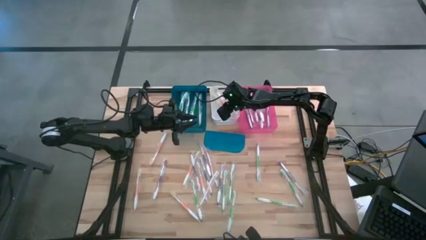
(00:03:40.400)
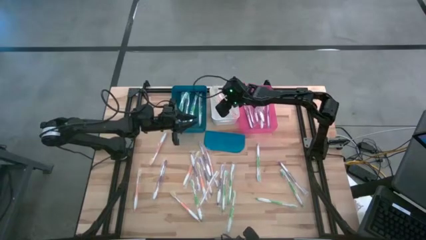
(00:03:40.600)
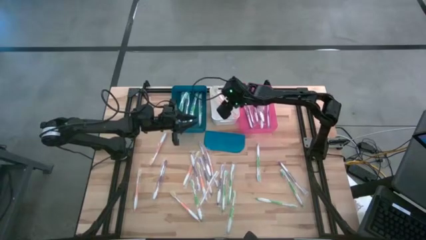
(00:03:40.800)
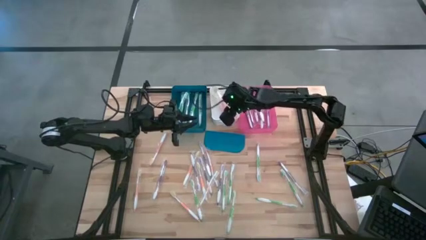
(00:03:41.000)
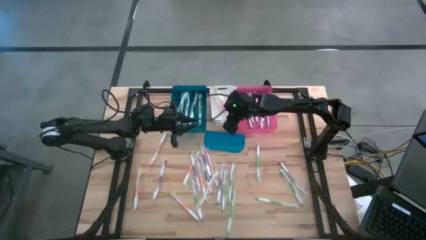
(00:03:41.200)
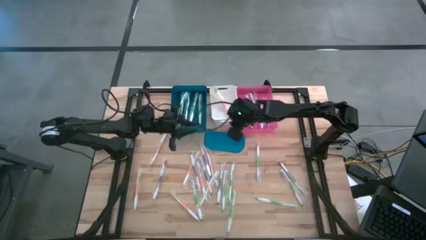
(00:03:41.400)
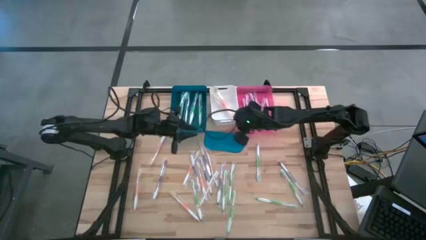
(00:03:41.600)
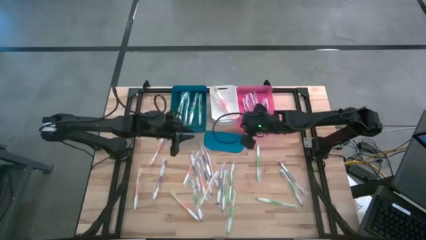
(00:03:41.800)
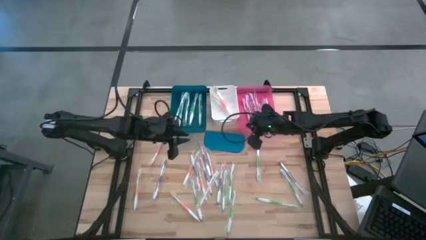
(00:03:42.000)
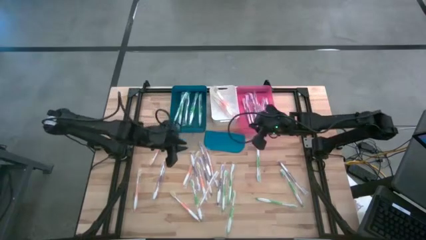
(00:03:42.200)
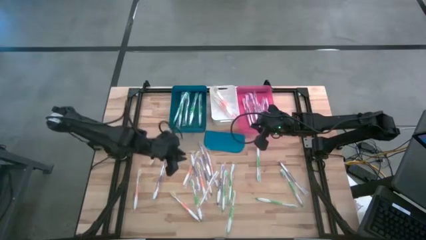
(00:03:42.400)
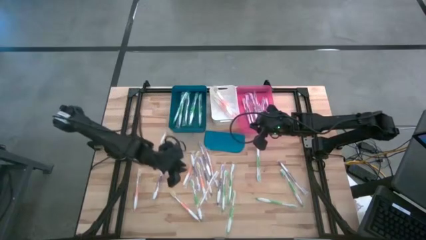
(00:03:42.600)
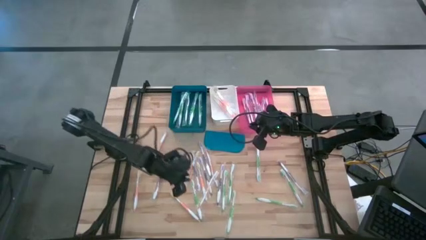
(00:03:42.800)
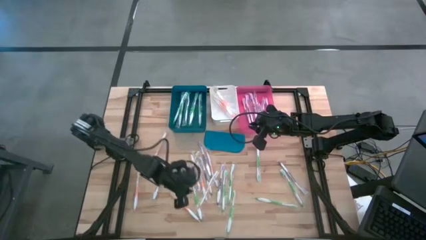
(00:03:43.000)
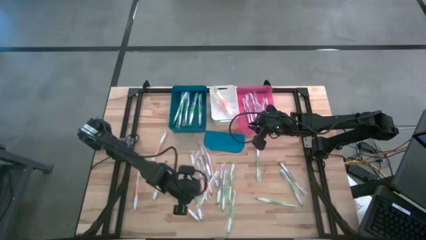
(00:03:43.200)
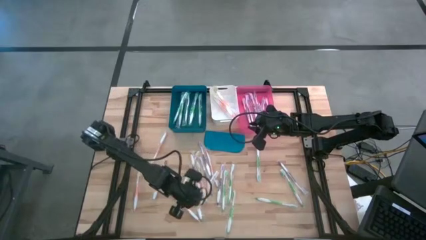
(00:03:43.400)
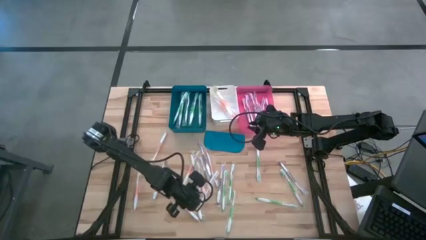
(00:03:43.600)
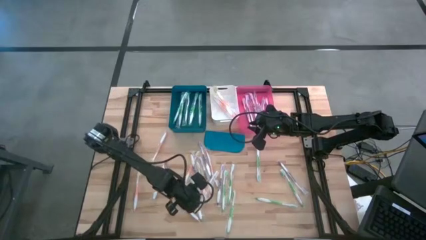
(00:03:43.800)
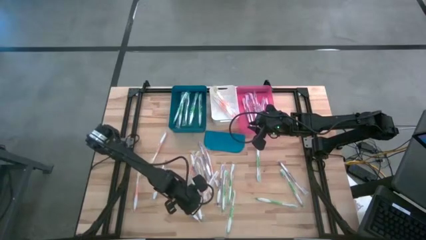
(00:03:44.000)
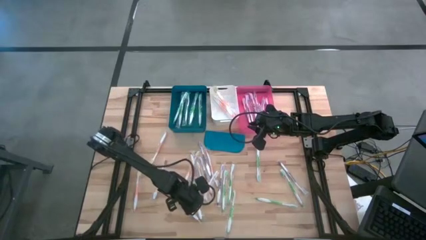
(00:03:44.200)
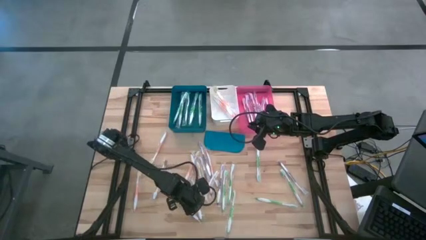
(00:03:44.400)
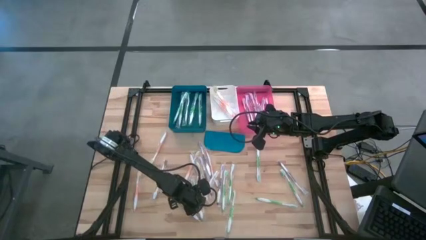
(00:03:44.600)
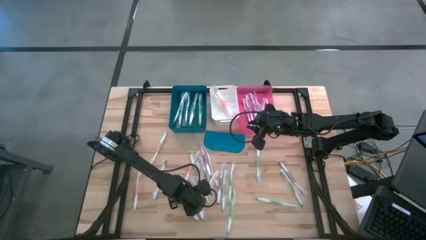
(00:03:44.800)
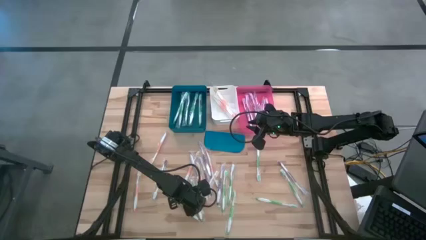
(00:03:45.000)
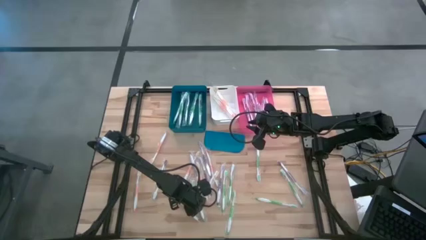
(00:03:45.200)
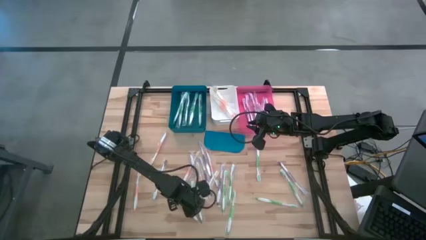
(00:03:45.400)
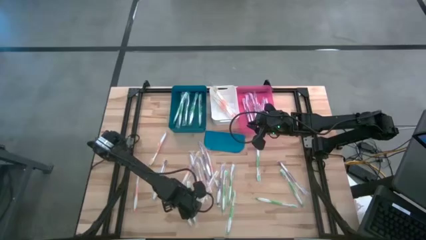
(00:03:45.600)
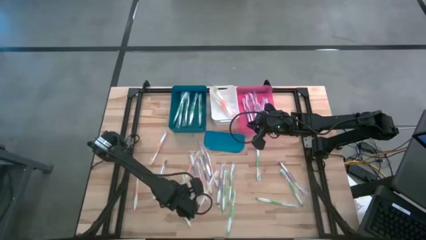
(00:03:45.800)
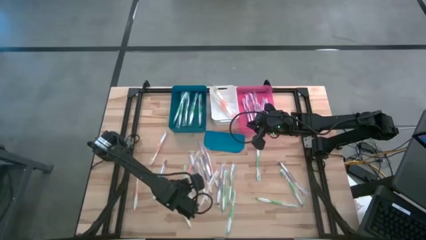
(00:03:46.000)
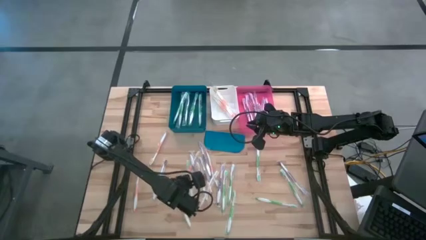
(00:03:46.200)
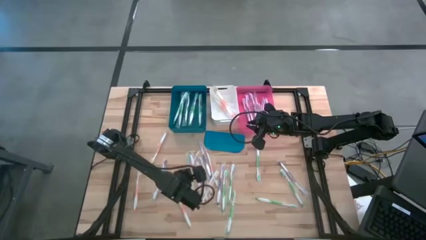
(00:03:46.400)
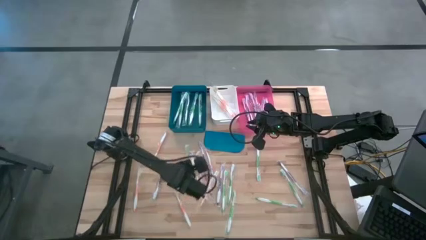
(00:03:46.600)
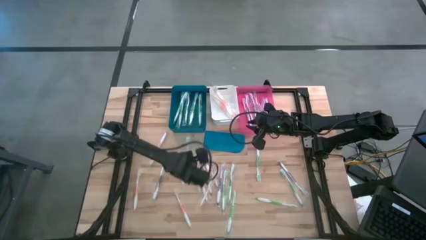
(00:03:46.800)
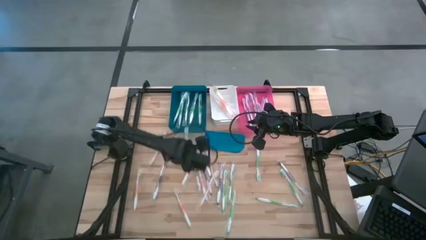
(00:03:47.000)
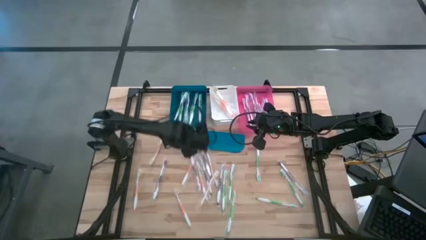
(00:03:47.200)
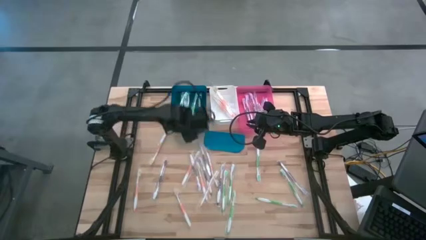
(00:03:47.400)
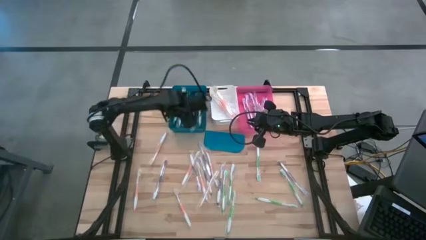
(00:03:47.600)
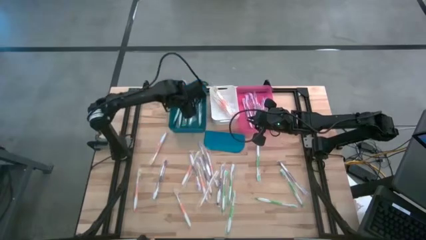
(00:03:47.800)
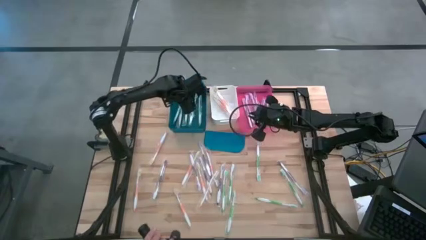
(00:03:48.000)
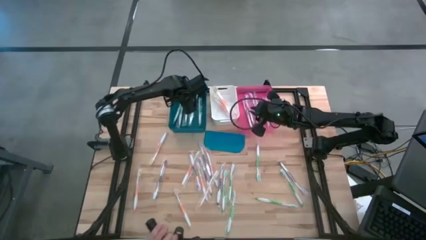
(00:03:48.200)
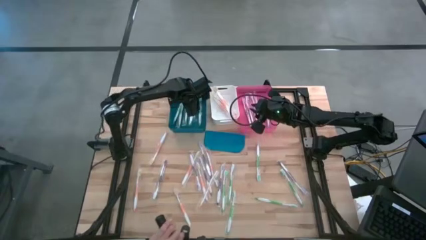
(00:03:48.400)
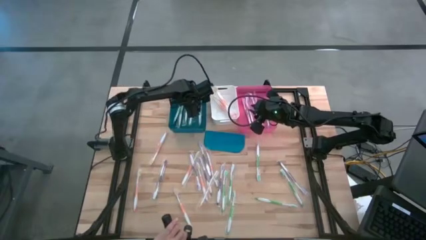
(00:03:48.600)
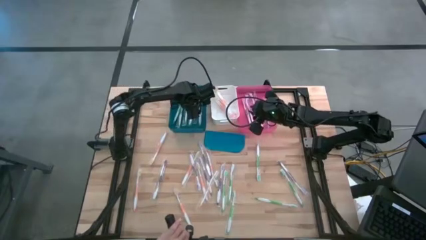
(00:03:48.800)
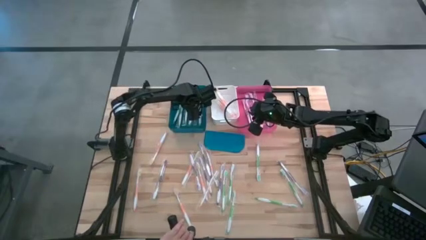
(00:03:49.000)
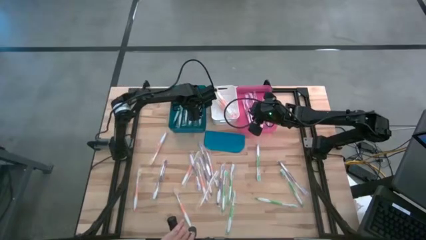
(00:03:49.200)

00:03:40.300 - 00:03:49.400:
Task: Pick & Place Toothbrushes
Put the green toothbrush into the blue bin

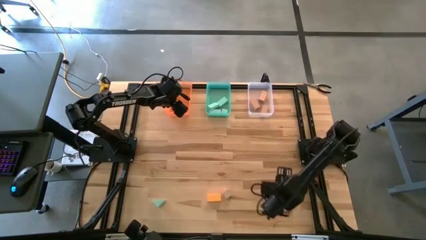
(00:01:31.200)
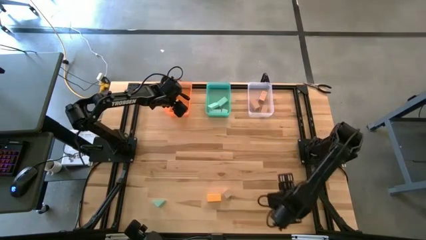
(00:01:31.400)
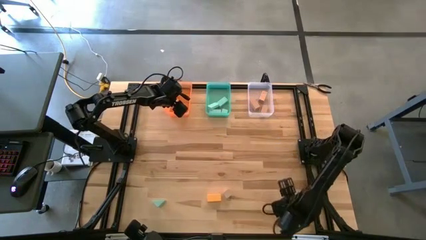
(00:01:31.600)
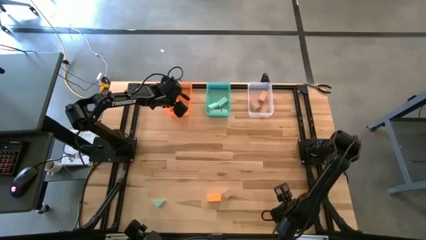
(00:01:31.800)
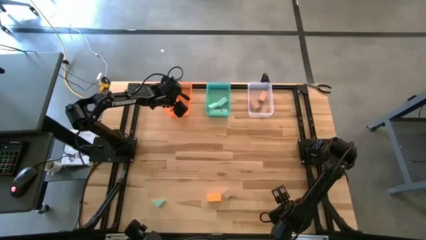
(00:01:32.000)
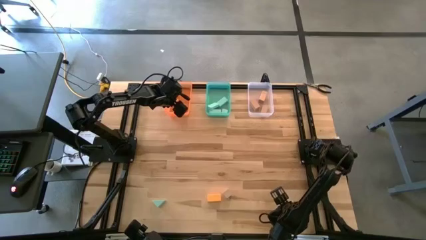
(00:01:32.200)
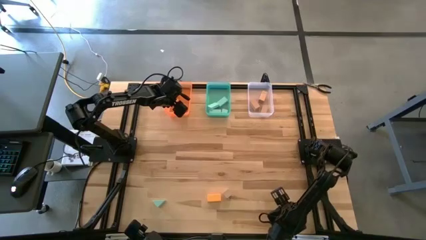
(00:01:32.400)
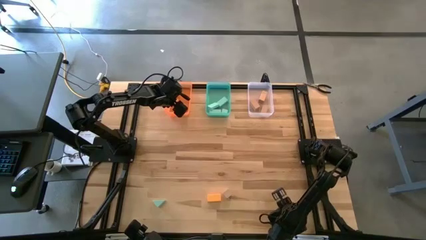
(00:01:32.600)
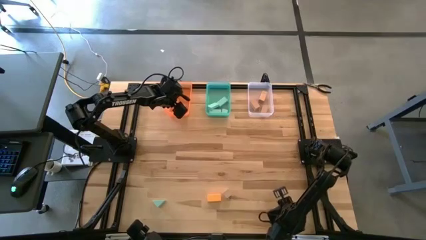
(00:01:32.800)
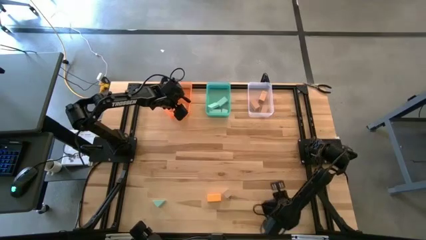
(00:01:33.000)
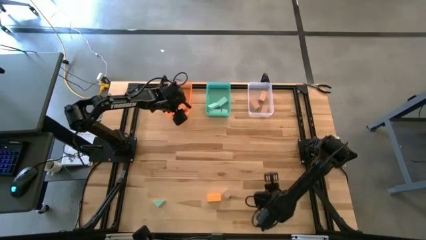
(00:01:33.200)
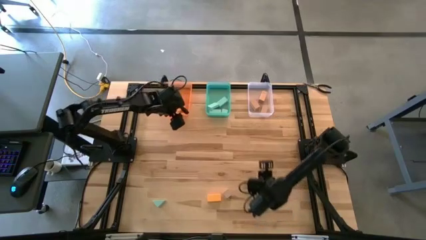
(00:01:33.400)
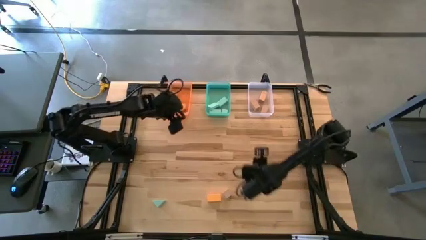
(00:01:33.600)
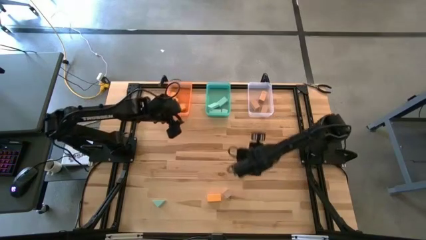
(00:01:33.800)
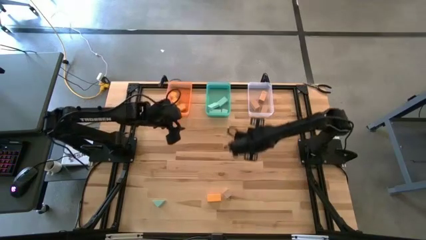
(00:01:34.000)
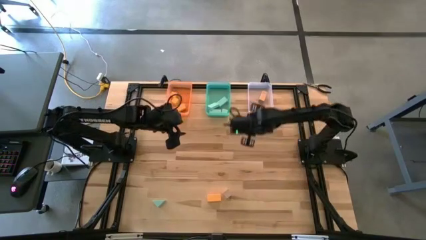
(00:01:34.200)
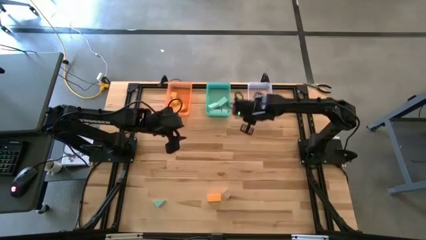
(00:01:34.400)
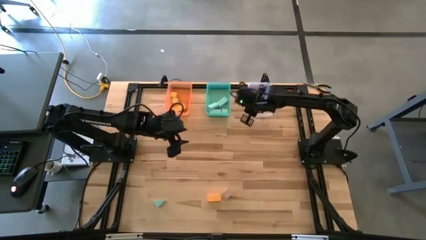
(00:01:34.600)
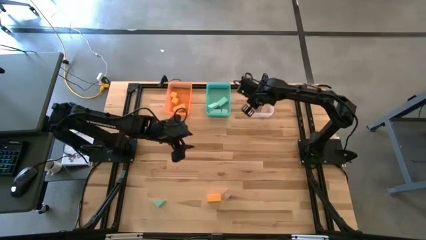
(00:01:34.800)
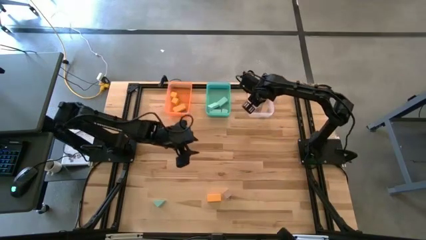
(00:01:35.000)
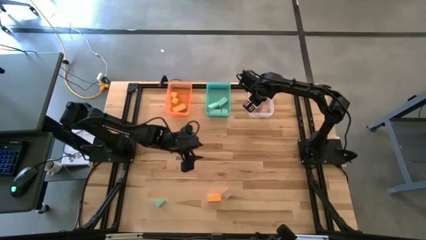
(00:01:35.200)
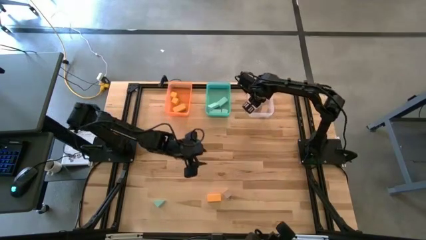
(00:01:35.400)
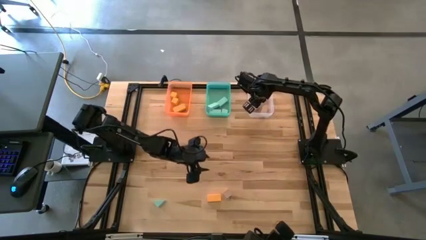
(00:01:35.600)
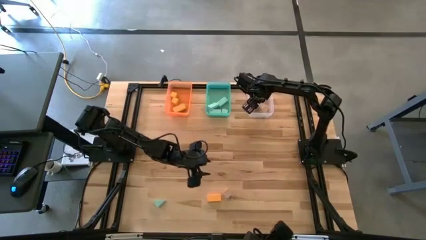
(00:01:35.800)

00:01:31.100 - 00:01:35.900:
Task: Sort & place blocks by color
Put the brown block into the transparent bin

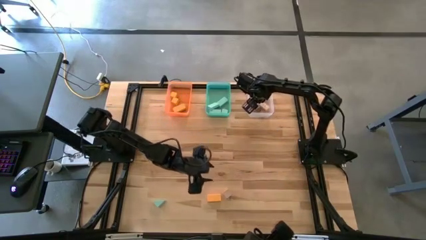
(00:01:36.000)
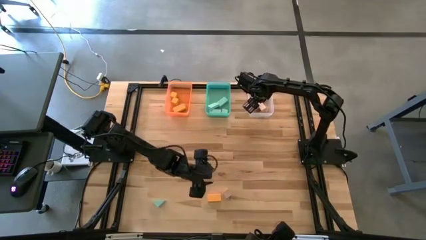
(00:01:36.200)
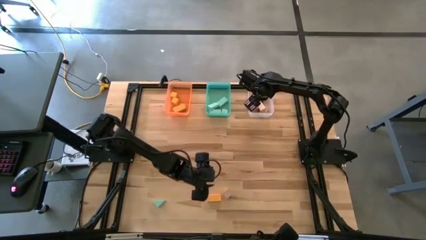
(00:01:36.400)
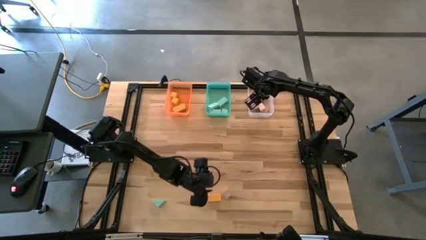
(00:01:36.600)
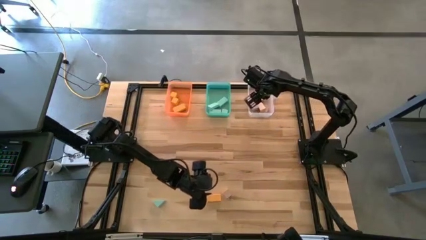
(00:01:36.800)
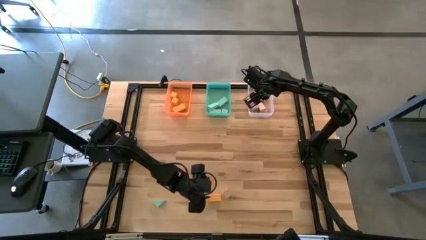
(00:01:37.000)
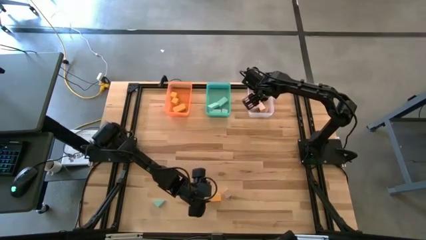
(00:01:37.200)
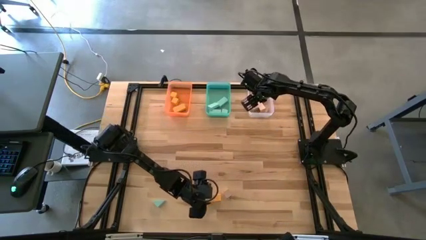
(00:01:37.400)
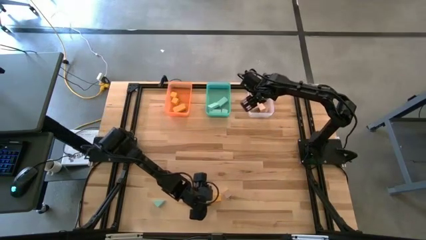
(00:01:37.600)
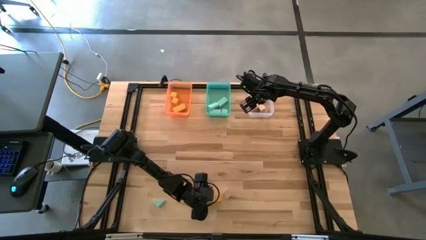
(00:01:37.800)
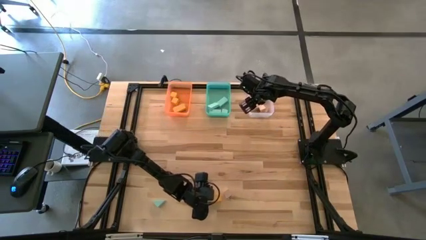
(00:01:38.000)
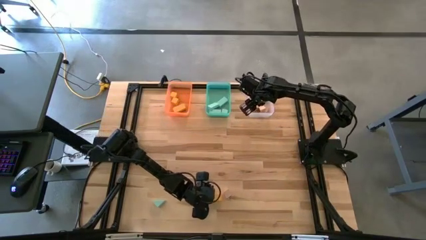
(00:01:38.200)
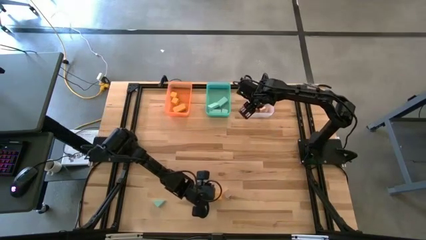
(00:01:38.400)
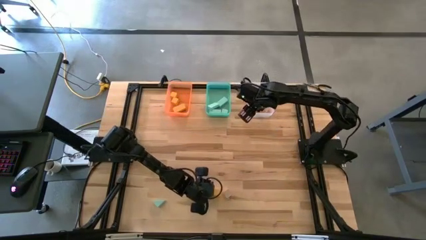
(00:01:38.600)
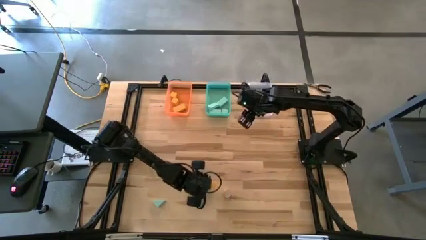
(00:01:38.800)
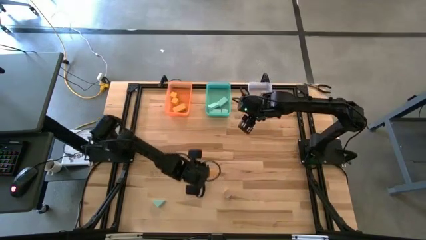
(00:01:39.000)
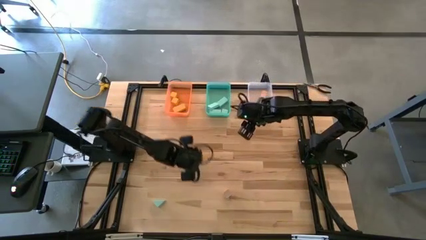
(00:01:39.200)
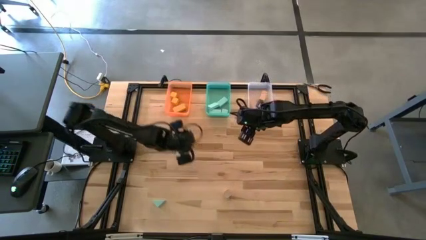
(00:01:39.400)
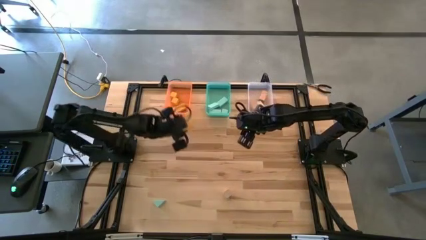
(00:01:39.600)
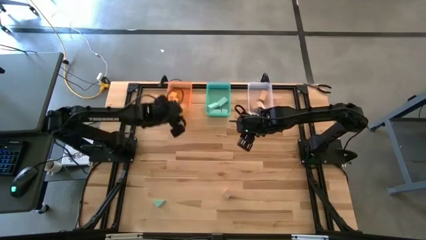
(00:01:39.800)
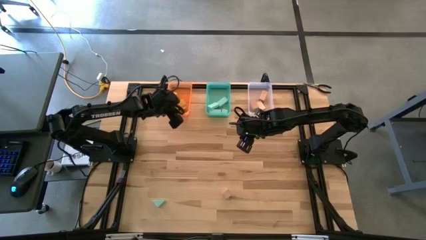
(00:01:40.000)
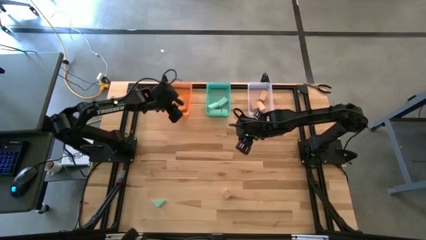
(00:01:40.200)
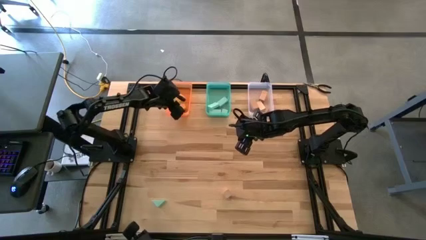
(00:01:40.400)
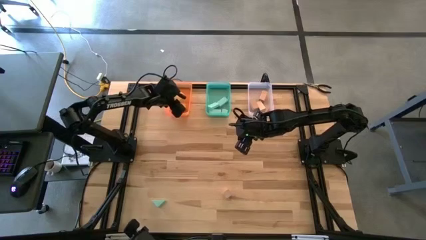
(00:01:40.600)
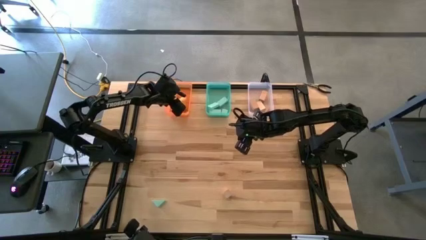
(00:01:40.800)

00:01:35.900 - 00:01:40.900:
Put the orange block into the orange bin
